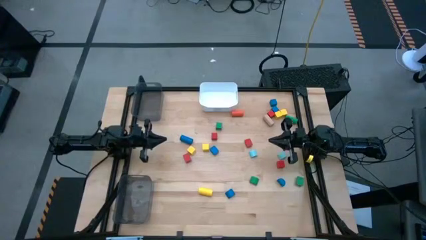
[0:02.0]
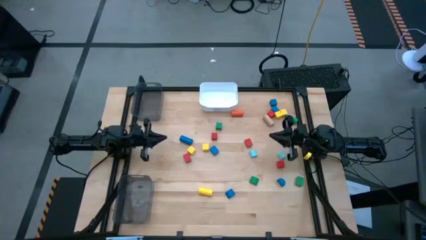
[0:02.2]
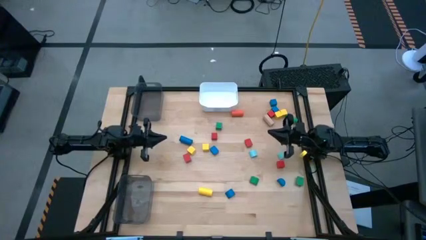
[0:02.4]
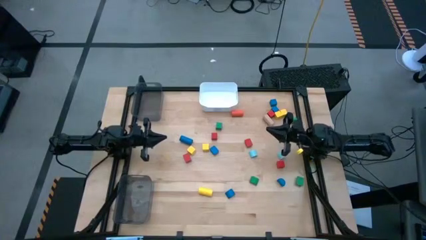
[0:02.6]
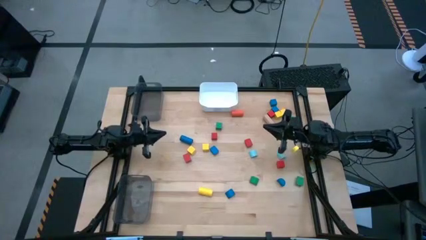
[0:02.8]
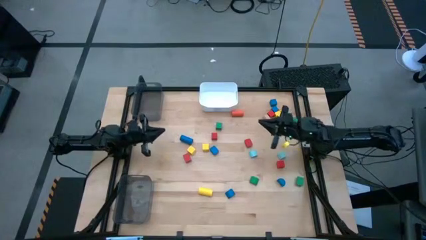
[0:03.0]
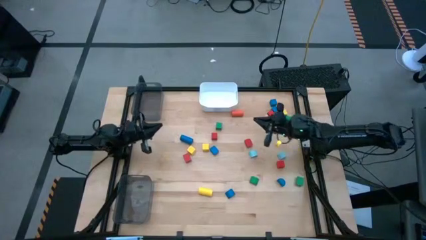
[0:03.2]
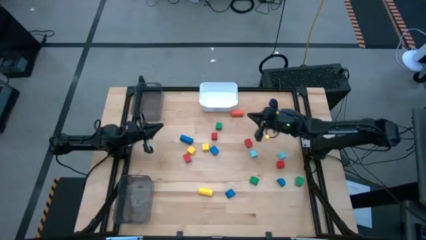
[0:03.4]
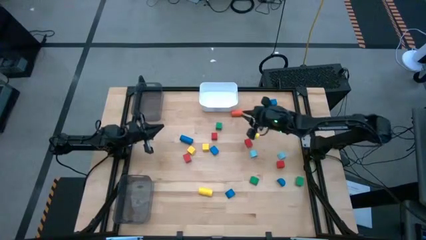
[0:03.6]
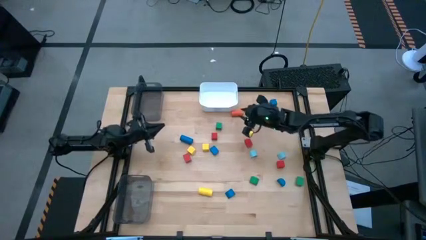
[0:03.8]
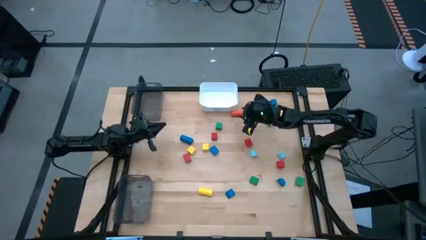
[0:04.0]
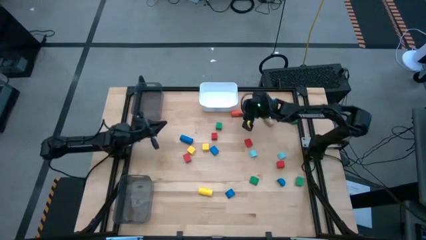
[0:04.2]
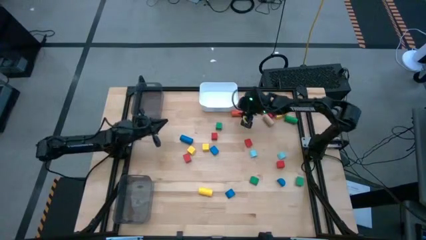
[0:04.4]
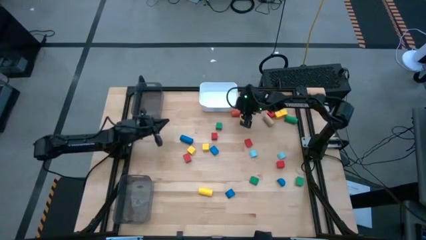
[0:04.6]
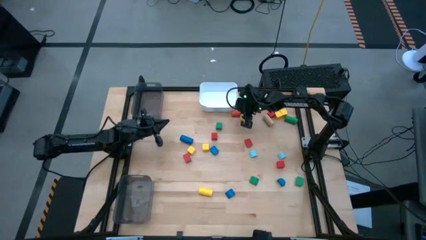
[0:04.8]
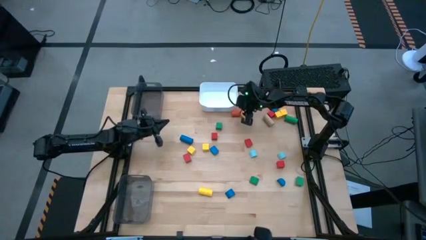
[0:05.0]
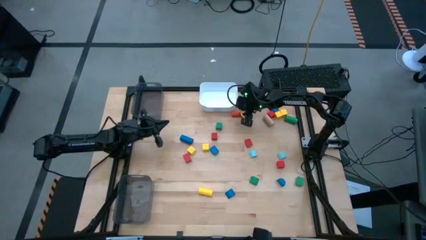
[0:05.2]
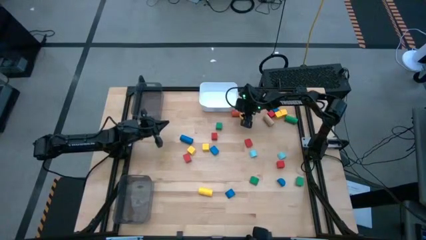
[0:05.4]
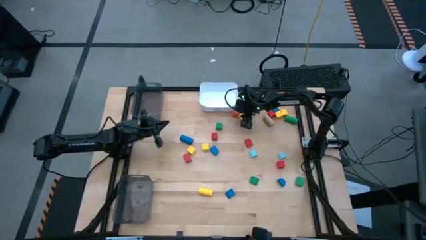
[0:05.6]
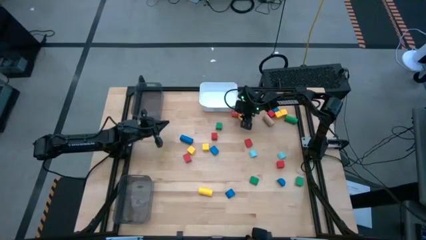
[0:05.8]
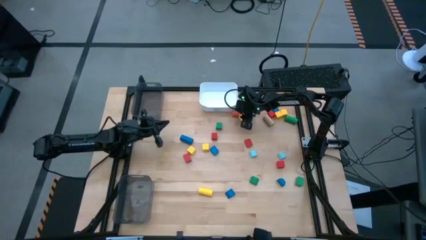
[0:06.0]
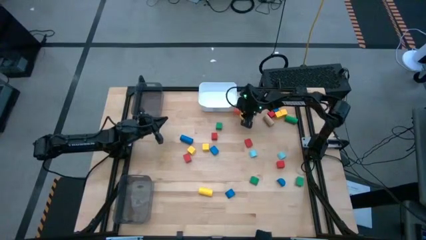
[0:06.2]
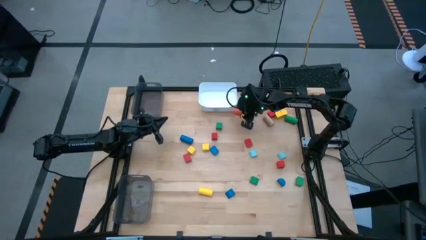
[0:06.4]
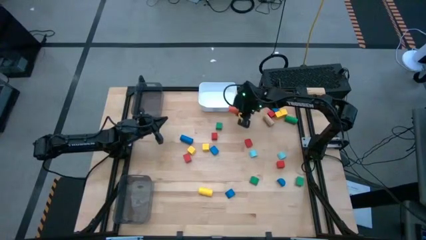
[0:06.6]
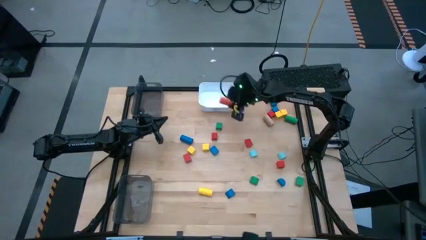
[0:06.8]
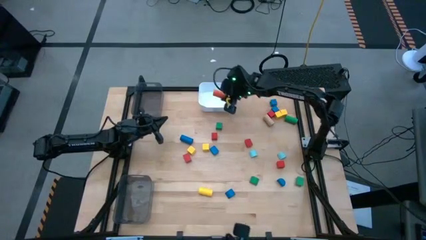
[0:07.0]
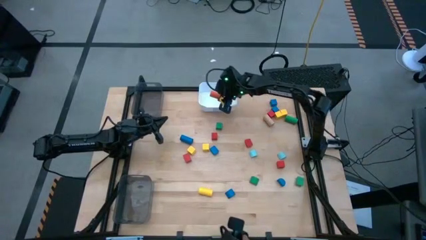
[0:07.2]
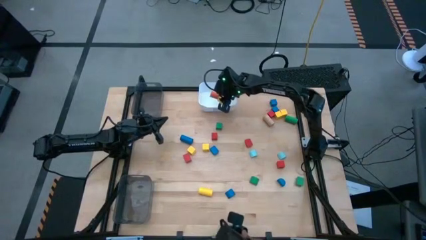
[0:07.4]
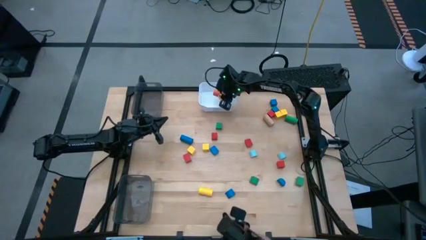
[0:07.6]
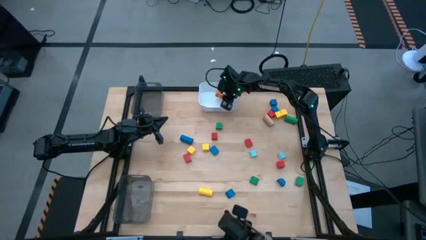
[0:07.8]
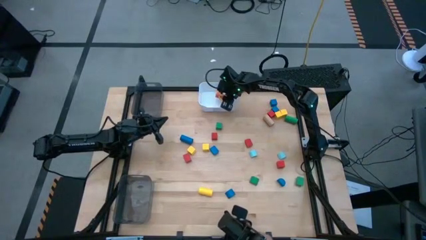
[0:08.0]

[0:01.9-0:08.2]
Task: Sort blocks by size
Put the orange cylinder block into the white bin

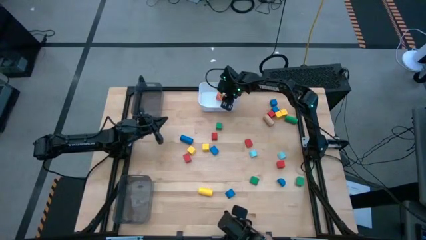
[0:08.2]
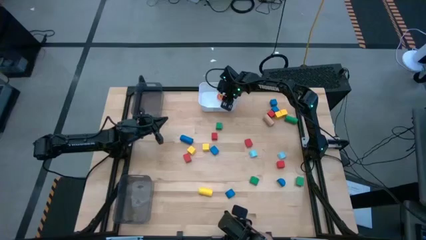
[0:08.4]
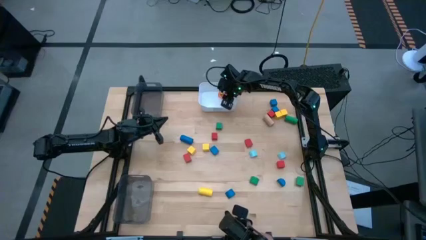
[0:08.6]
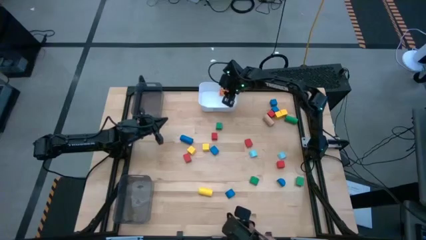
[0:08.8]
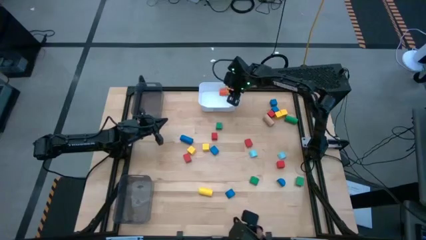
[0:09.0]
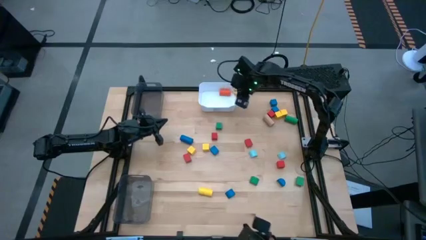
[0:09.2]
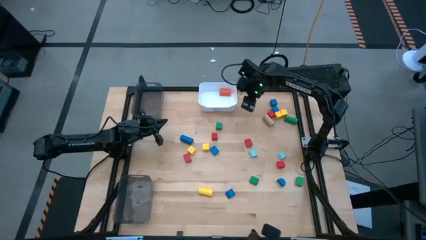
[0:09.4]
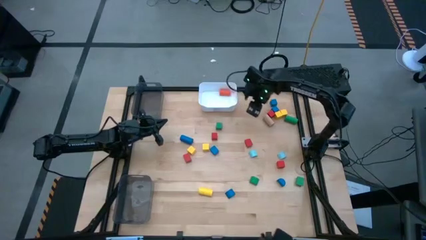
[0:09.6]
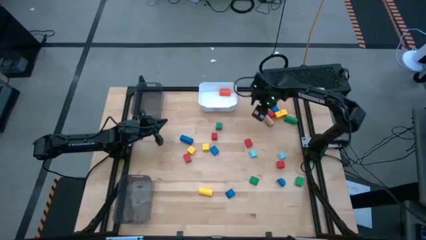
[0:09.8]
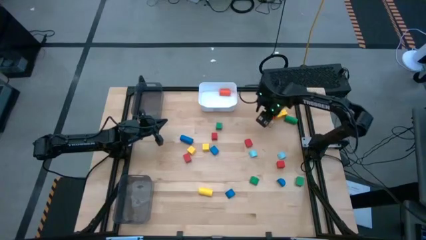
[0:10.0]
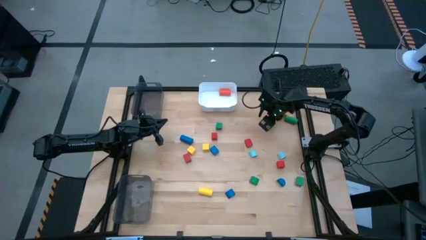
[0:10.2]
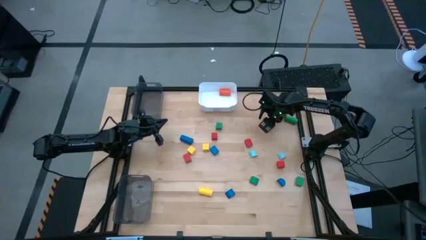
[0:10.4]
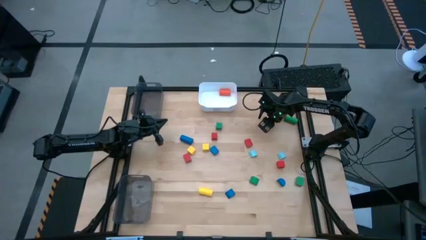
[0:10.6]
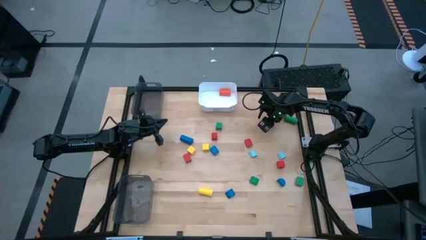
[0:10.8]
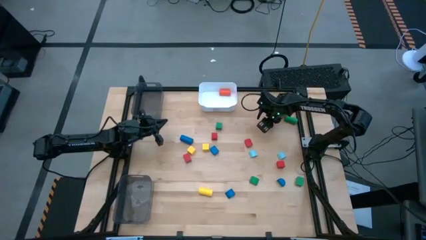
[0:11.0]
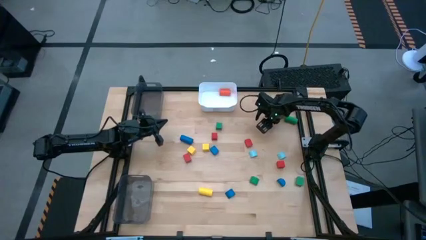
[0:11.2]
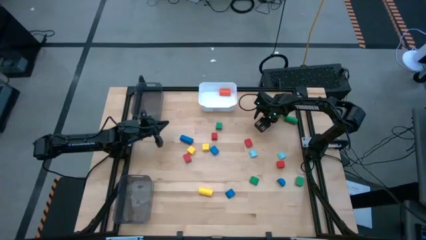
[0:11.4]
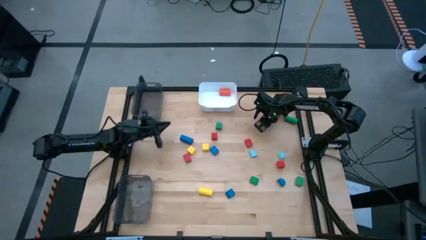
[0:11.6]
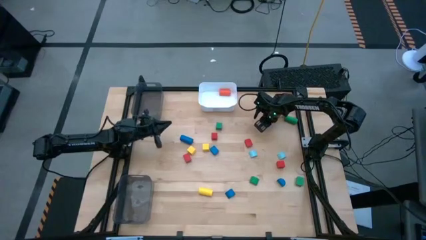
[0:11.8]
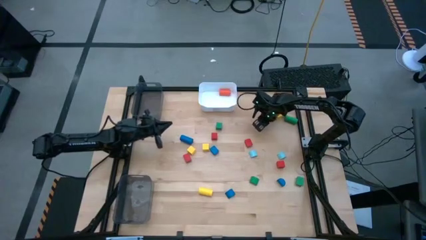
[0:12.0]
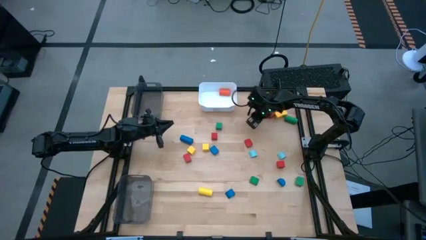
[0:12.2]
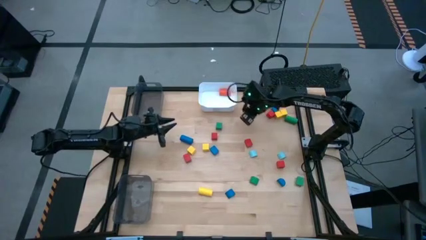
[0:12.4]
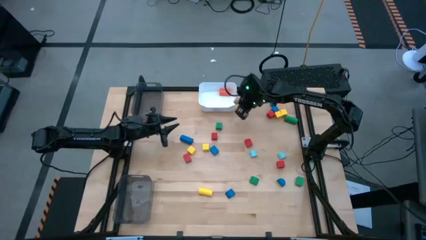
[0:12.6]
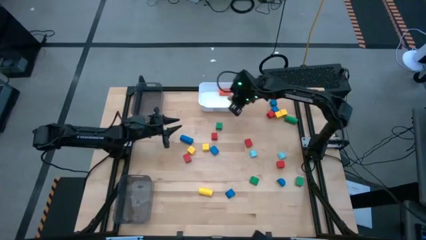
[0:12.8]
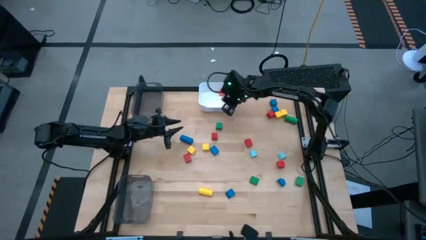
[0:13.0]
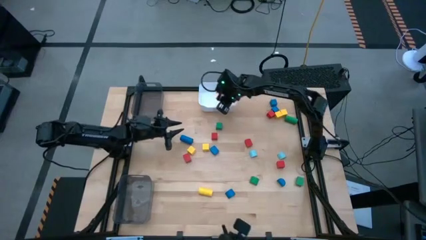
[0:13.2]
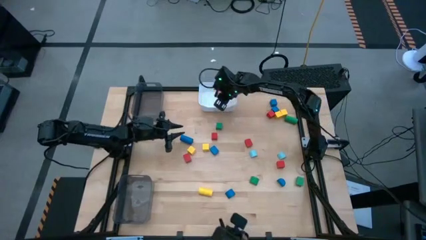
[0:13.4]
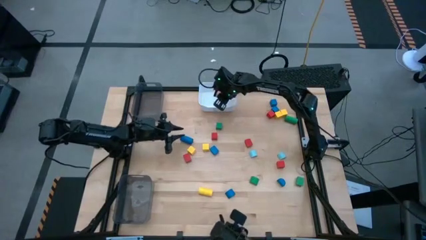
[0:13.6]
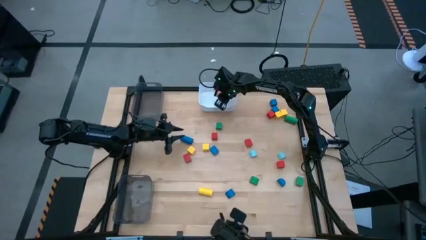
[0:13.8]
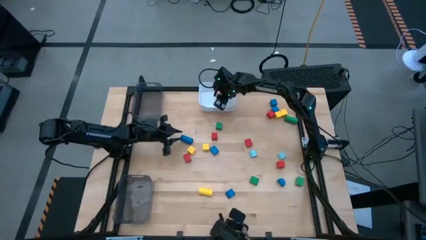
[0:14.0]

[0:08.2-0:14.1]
Put the brown cylinder block into the white bin

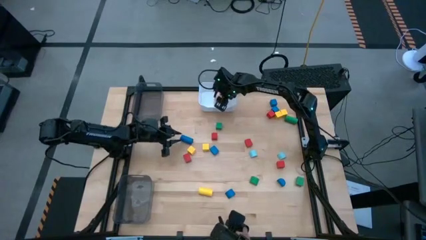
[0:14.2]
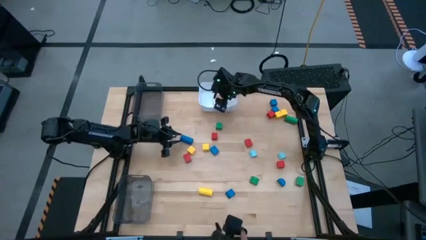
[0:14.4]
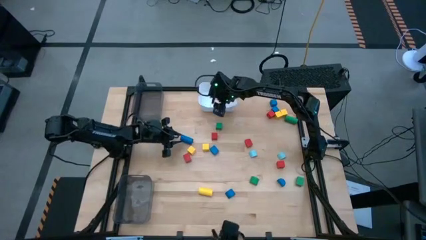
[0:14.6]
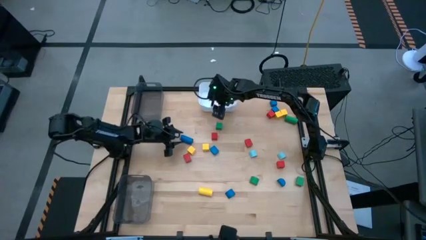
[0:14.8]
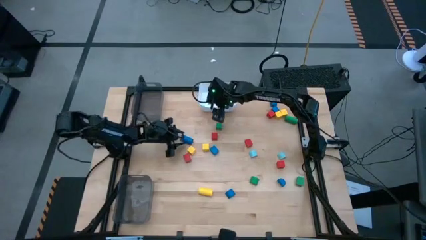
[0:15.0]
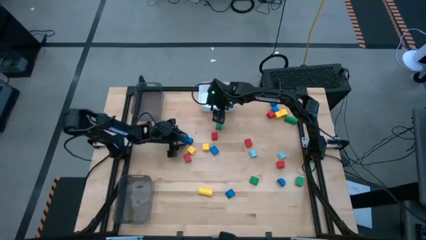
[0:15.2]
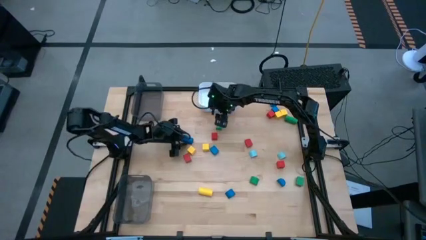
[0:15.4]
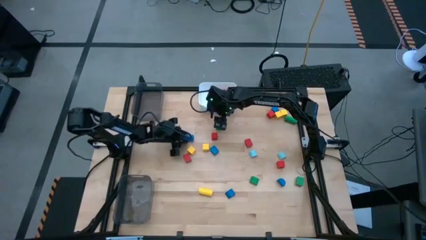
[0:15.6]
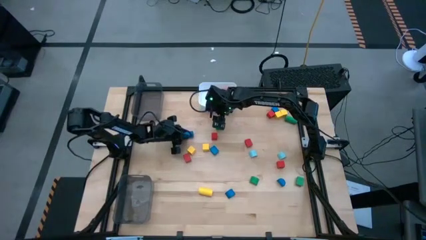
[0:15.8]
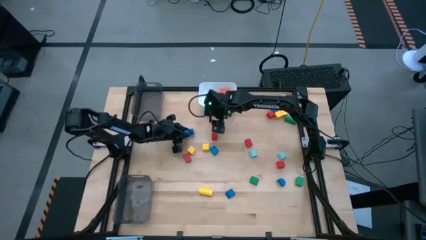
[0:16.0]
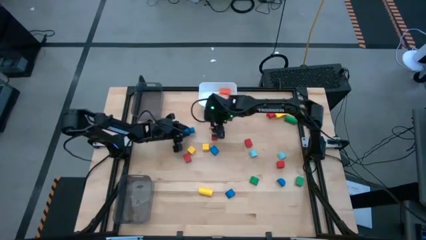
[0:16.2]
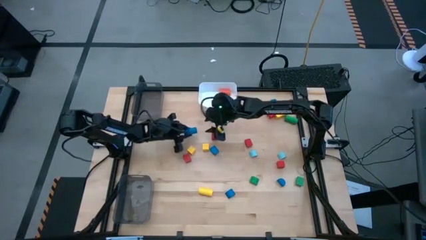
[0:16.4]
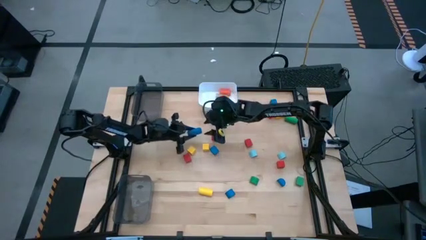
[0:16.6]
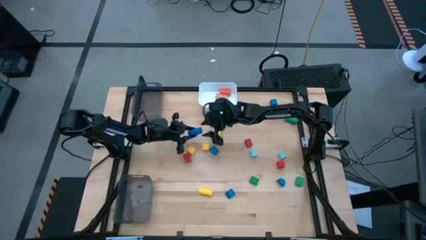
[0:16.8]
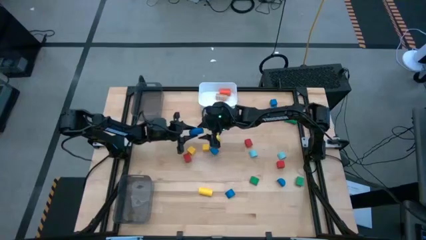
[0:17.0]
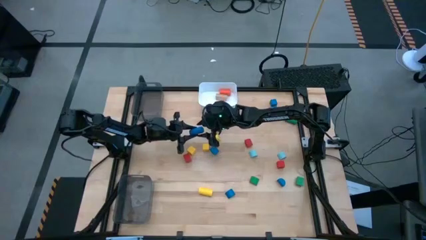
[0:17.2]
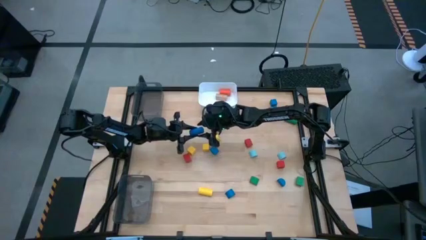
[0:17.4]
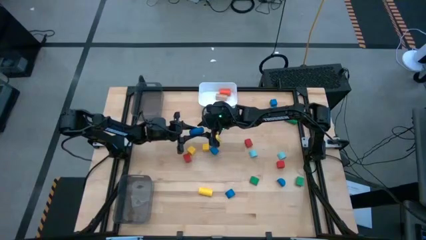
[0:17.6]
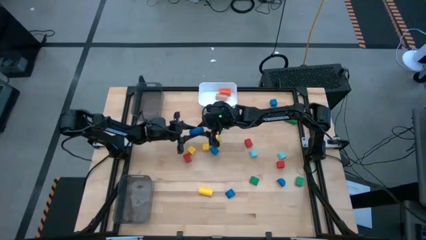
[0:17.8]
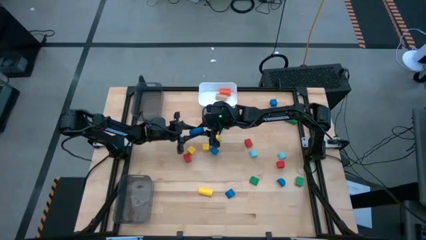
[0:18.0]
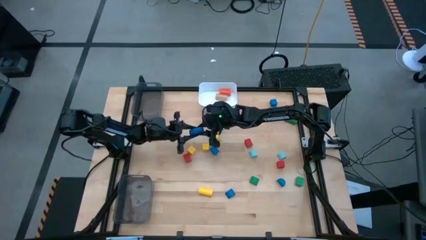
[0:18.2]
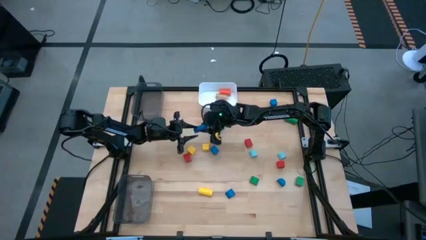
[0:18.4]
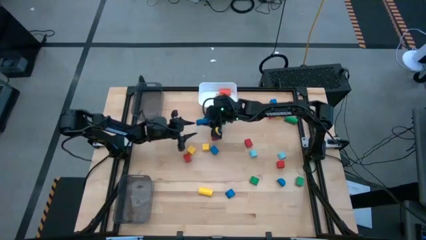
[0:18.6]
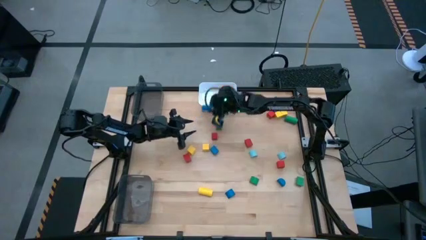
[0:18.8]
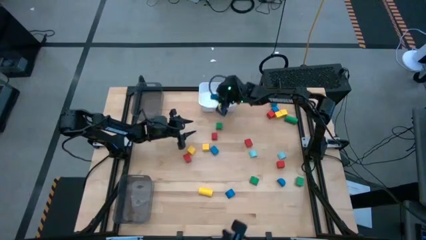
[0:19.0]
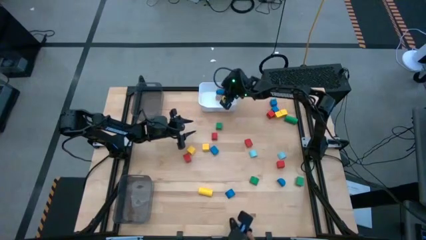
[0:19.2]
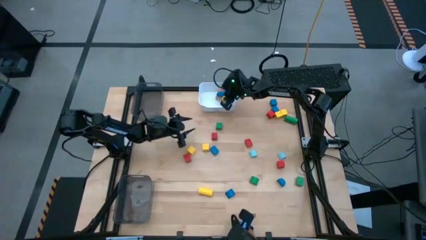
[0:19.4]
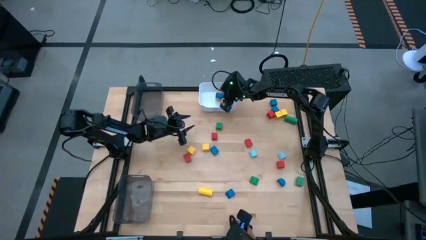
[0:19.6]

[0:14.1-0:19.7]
Put the blue cylinder block into the white bin
